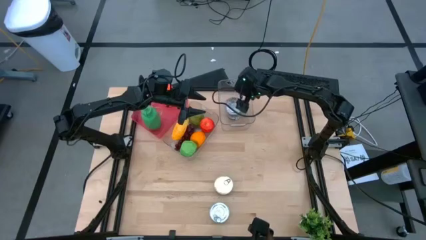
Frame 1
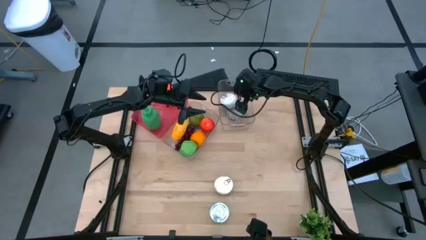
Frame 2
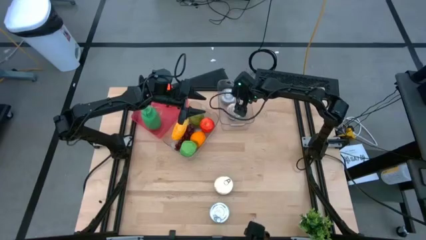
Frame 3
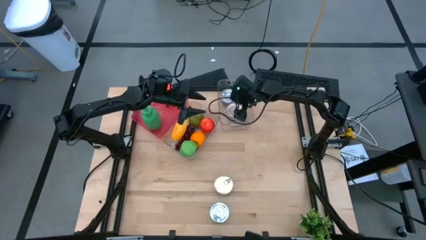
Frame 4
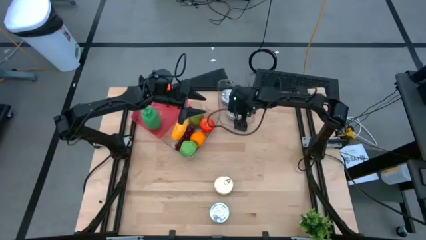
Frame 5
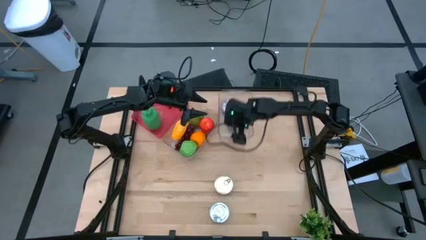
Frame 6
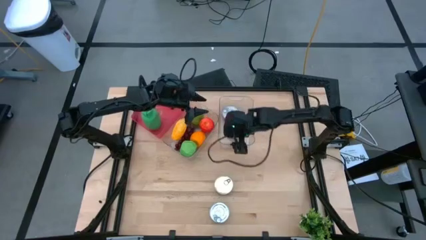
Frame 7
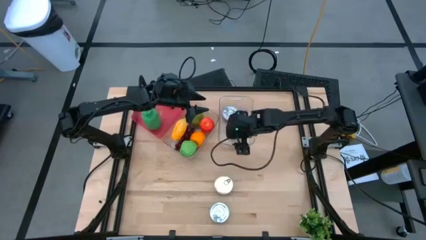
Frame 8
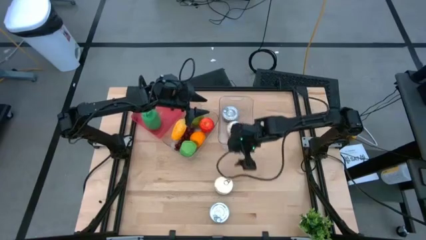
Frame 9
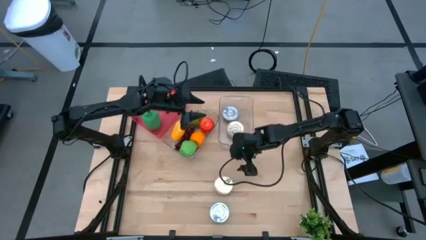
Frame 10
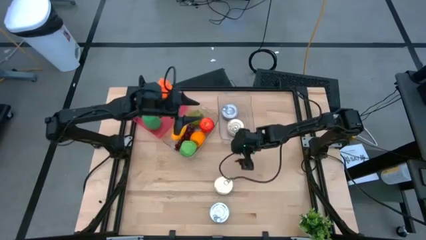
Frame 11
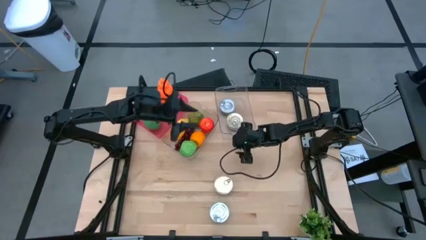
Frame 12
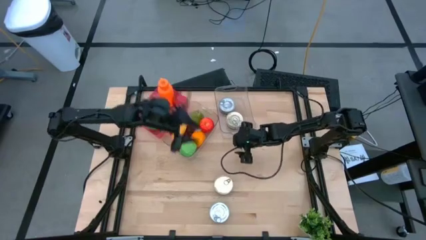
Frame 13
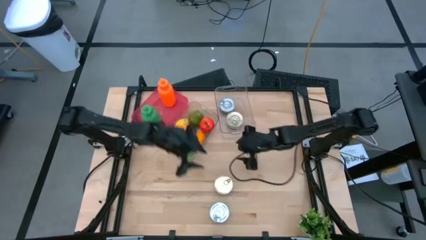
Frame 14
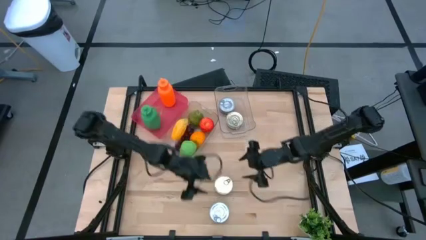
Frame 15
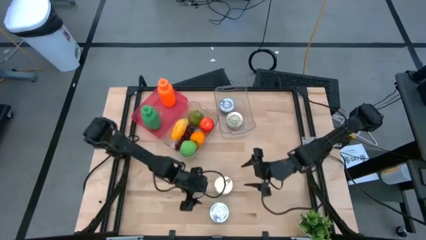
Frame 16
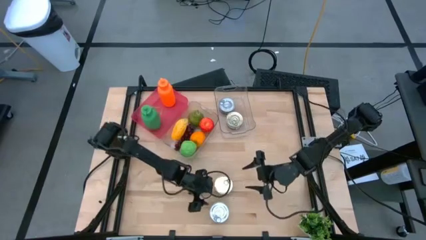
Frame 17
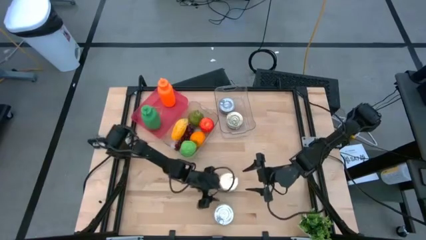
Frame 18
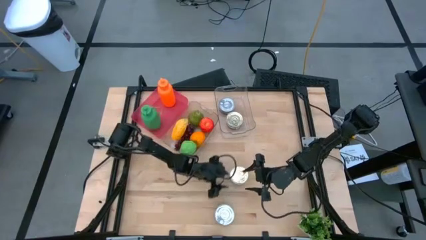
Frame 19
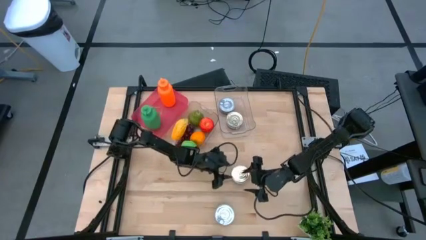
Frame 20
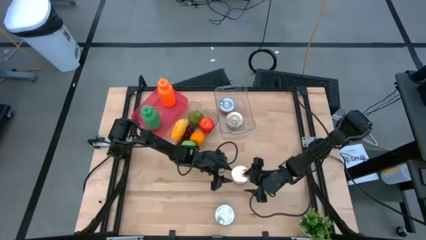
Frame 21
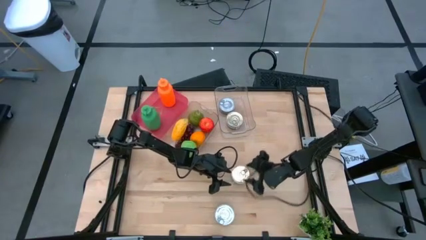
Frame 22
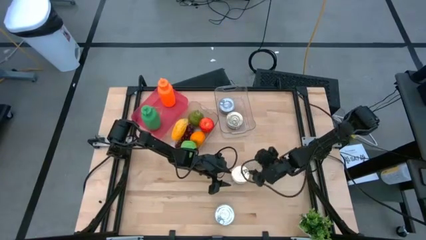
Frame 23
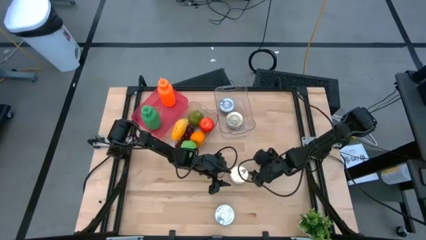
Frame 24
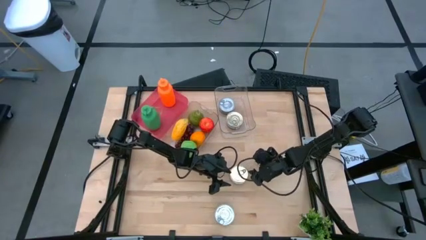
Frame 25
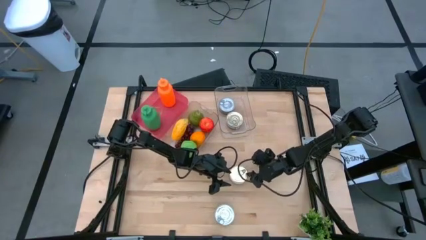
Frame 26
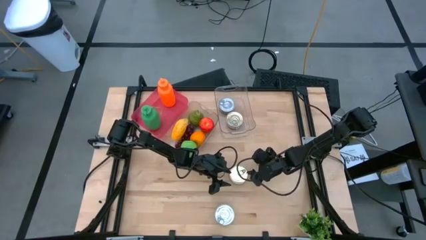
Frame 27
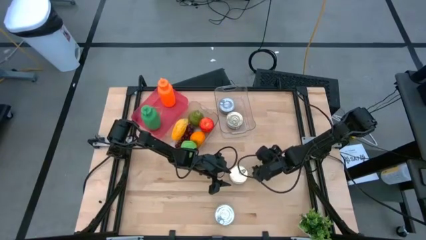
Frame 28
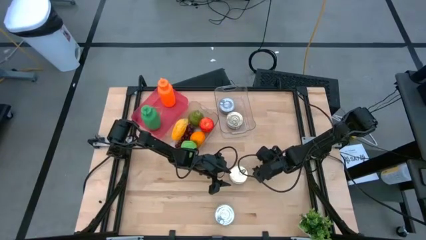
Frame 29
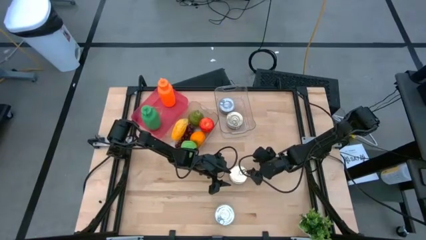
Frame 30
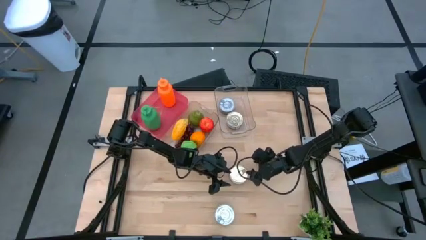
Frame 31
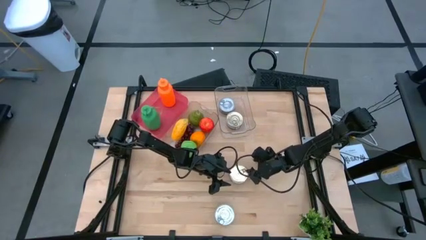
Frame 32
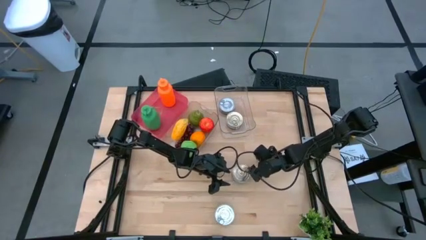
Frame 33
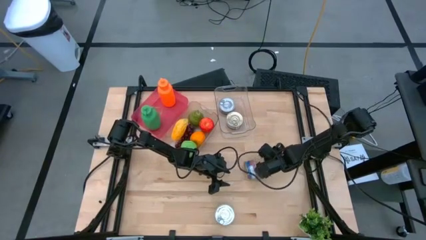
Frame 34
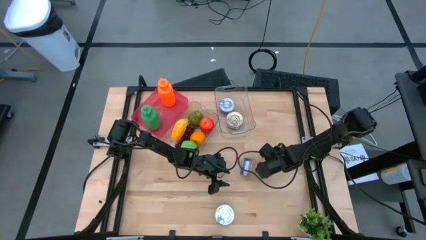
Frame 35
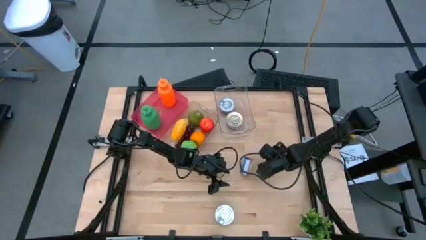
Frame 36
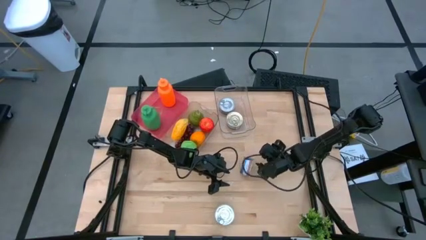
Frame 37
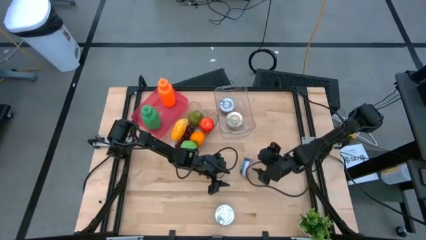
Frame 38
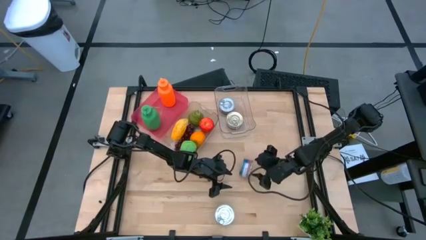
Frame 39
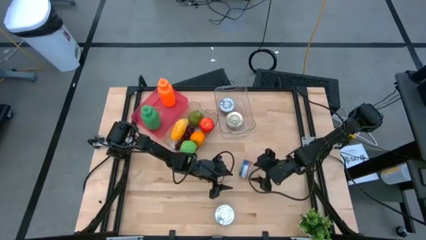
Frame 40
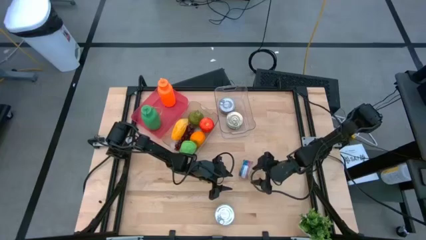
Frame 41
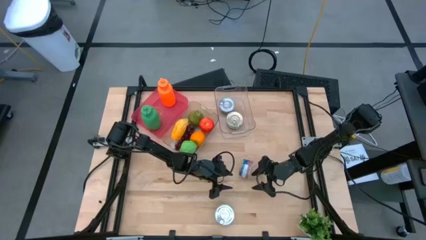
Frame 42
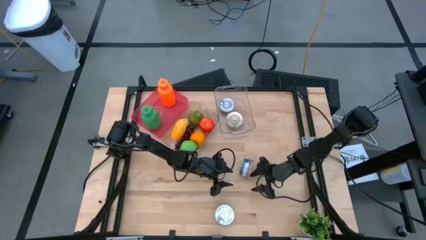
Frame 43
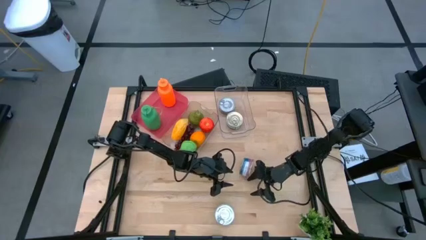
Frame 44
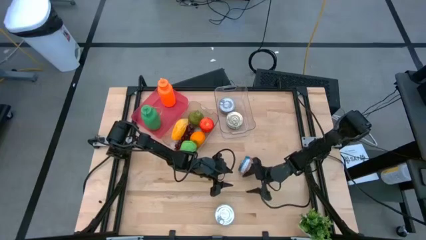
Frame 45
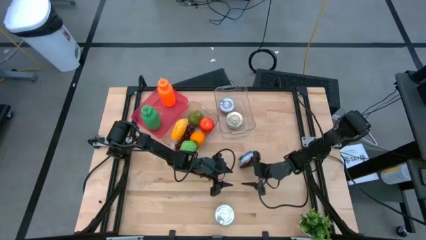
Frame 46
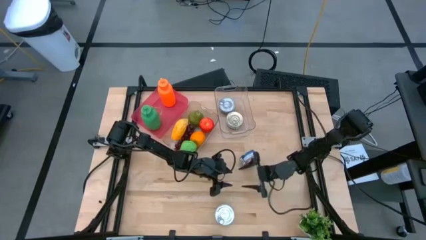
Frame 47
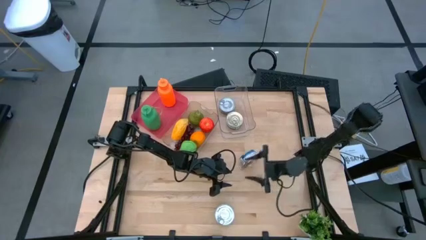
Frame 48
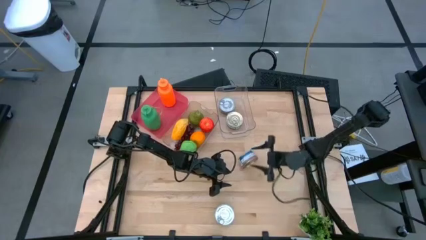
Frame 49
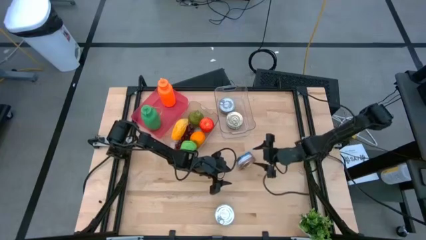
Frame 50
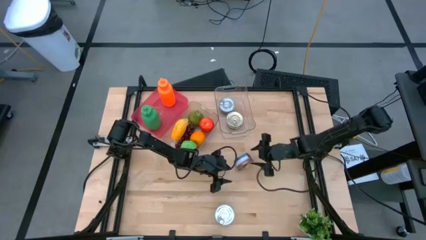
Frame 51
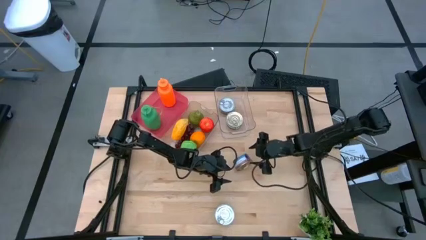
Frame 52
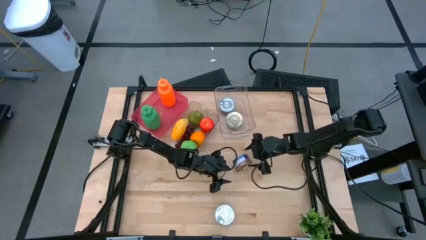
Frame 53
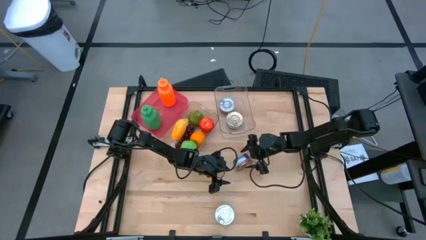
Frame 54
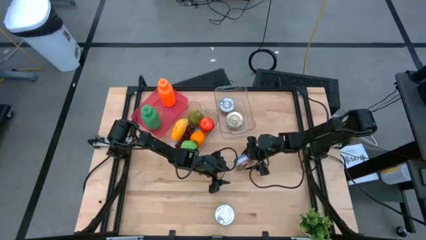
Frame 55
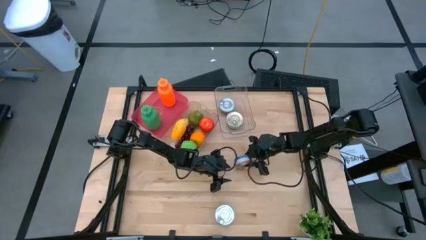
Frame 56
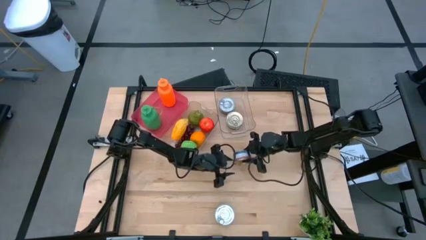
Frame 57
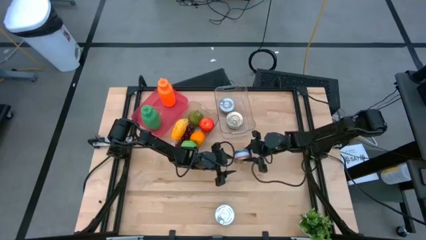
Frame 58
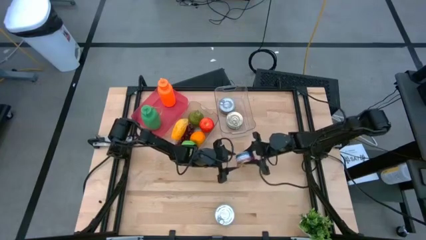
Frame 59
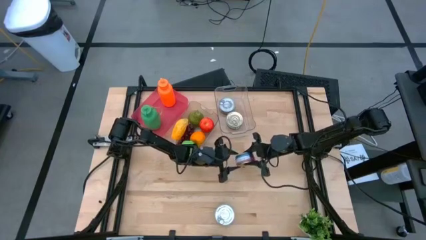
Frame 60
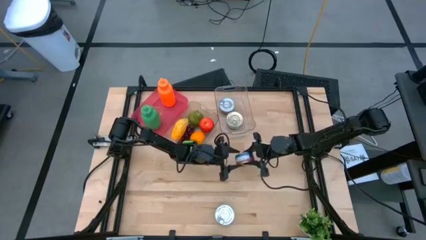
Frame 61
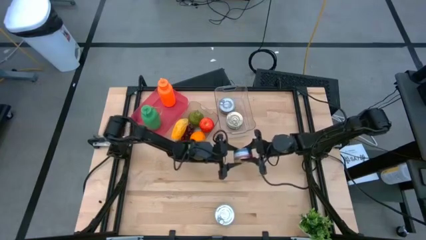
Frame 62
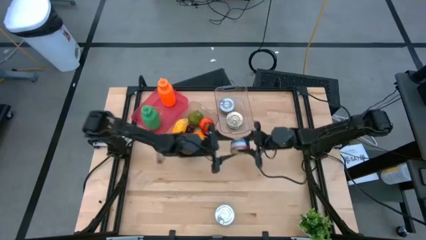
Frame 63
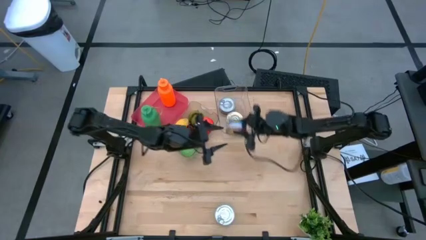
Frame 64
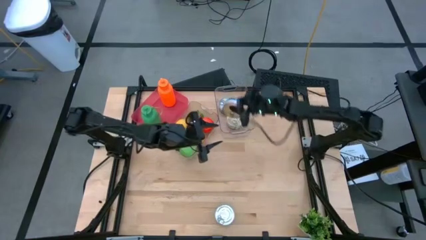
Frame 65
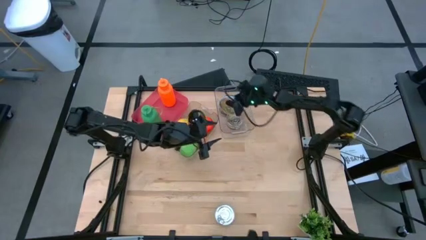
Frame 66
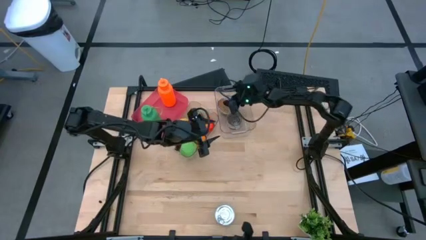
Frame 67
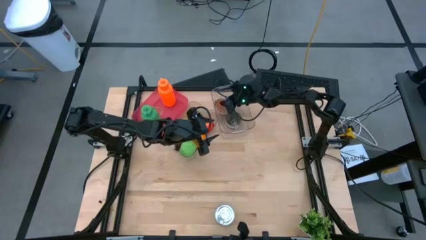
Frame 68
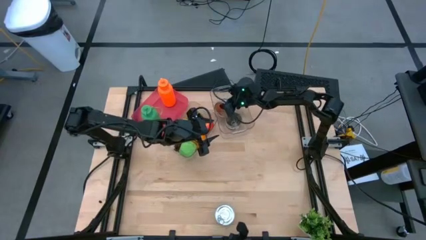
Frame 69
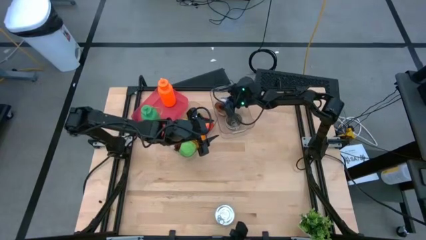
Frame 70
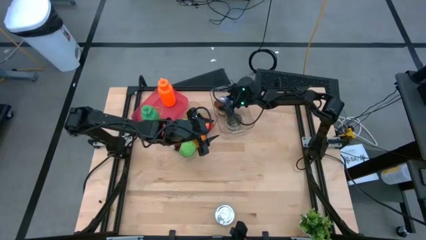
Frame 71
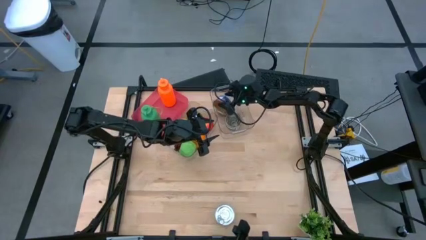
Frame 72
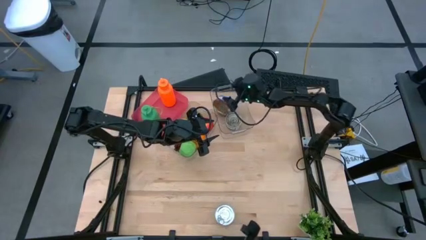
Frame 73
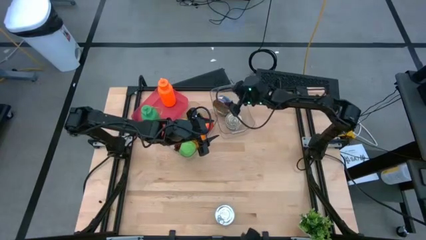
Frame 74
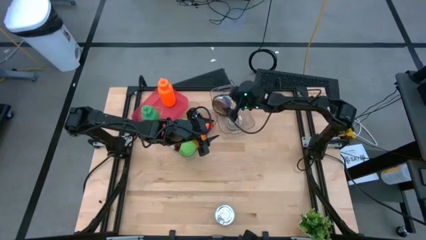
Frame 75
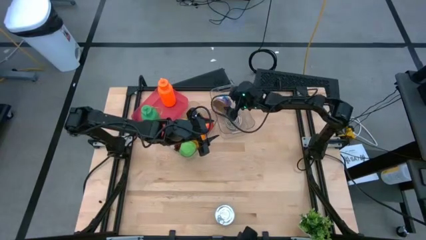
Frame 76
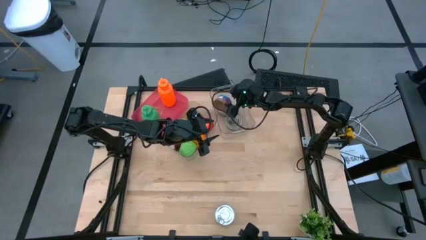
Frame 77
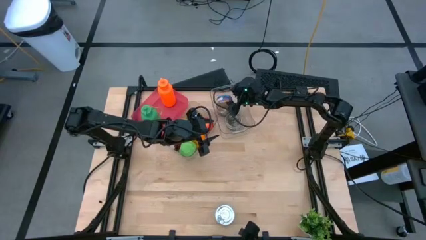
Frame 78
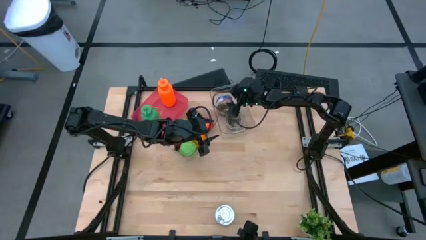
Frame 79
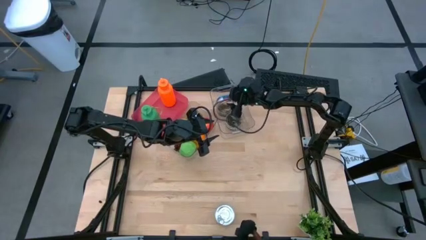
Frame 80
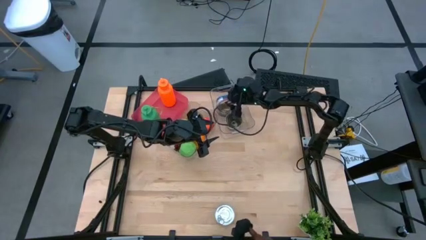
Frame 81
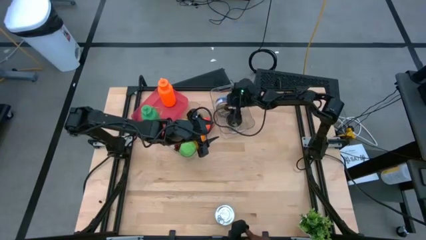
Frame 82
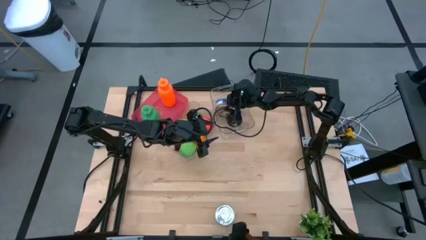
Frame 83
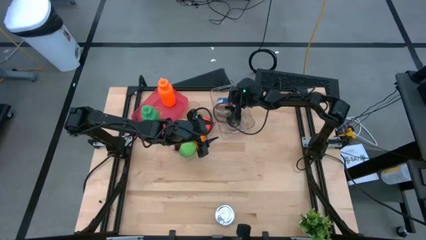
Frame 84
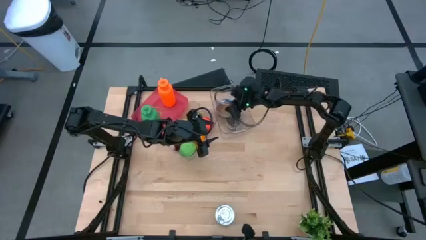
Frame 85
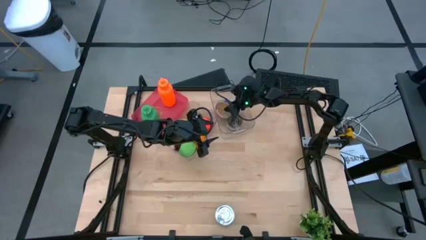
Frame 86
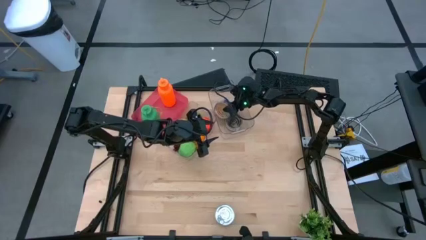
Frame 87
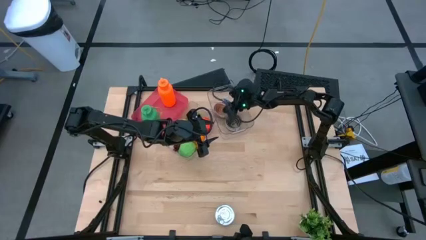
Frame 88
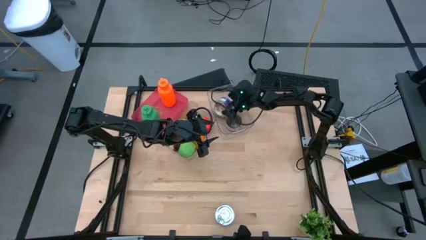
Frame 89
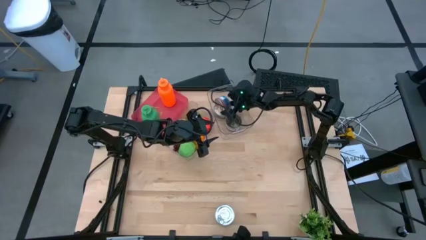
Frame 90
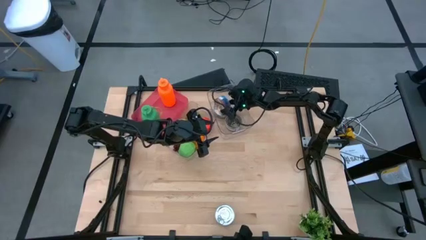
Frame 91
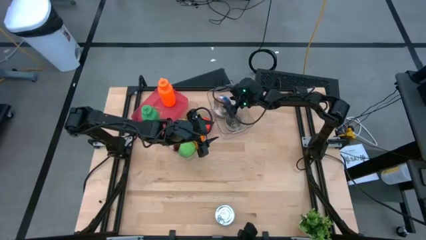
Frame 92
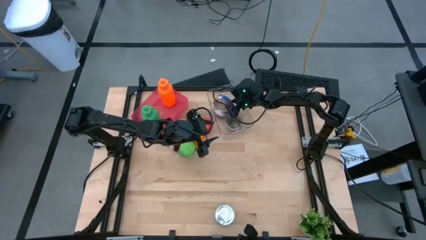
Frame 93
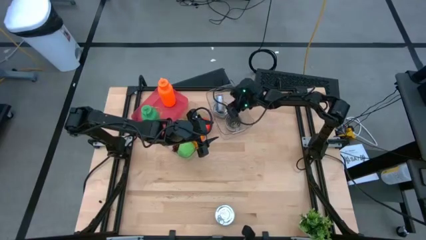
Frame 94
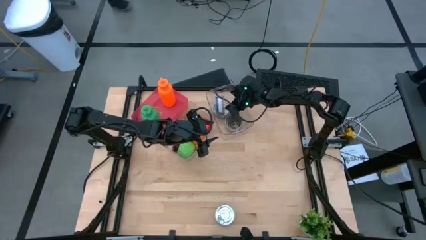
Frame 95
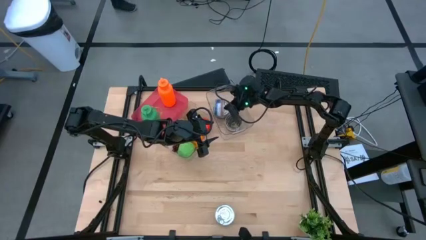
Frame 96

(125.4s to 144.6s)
Task: Pick & Place Food Item
Put the blue pink tuna can into the right transparent bin
